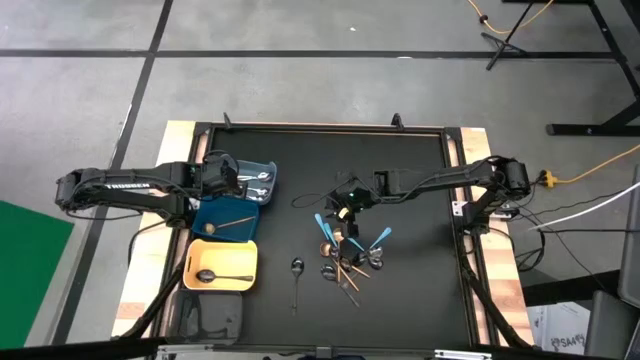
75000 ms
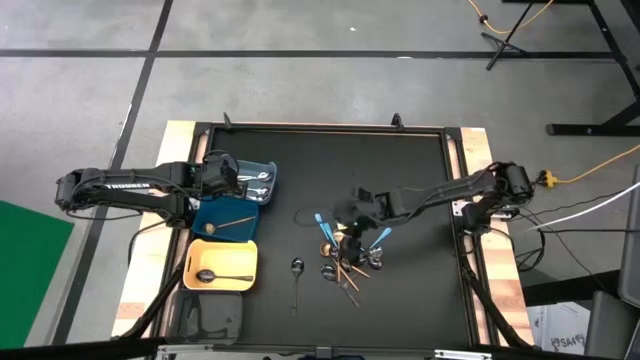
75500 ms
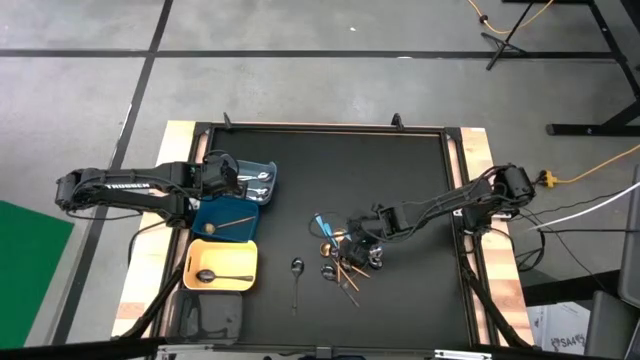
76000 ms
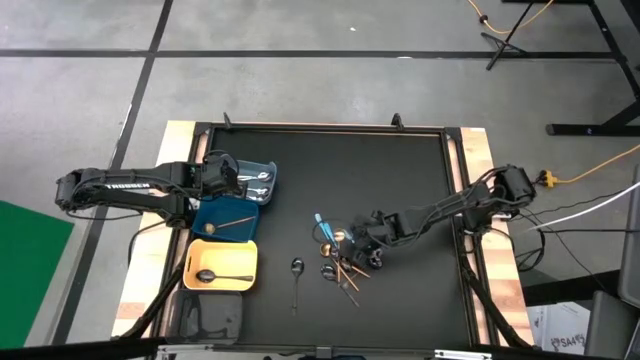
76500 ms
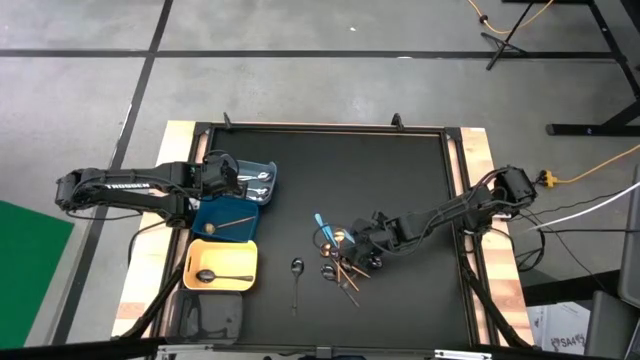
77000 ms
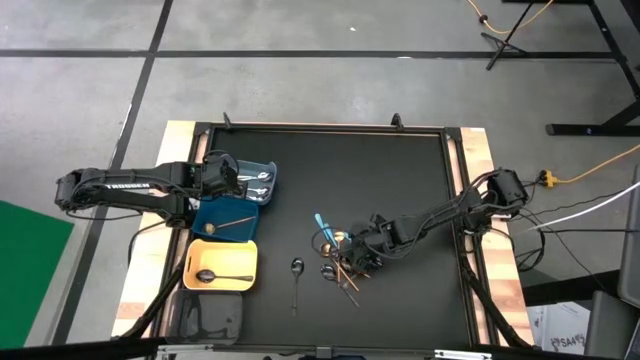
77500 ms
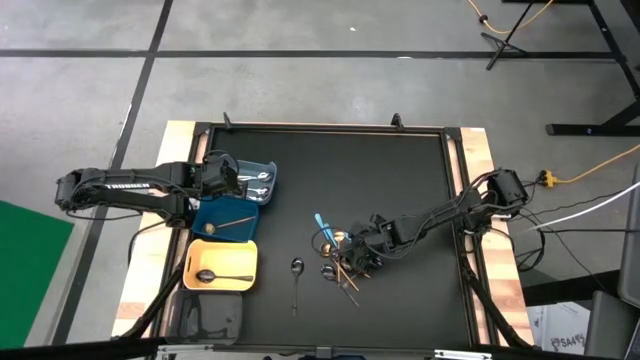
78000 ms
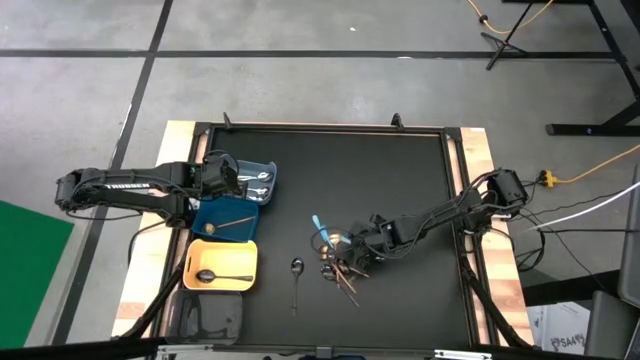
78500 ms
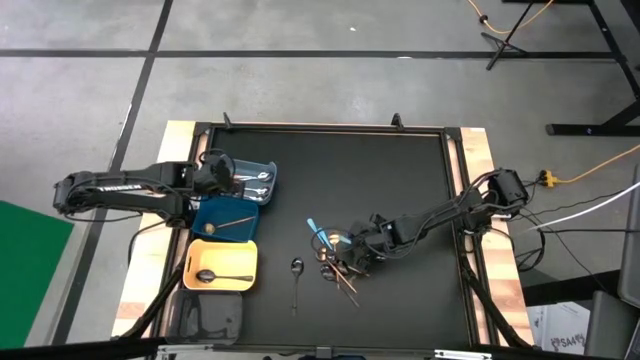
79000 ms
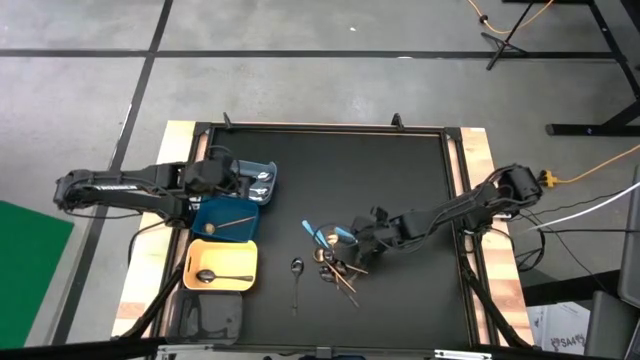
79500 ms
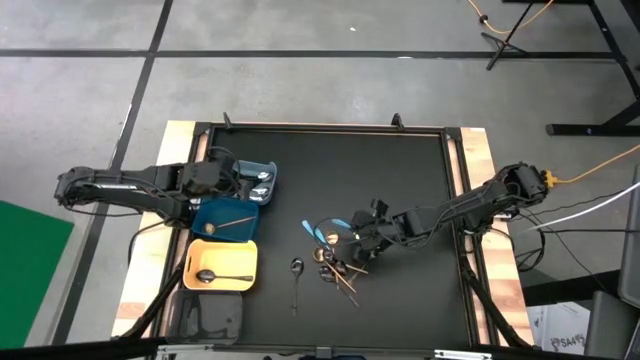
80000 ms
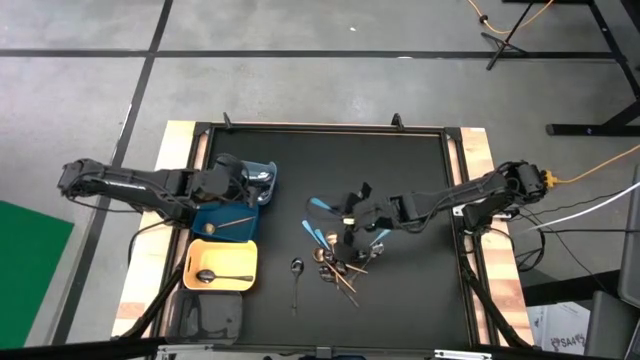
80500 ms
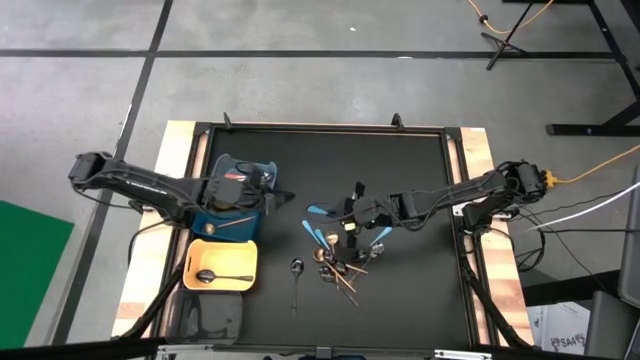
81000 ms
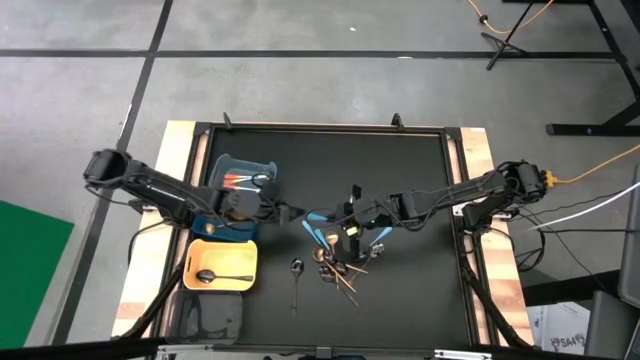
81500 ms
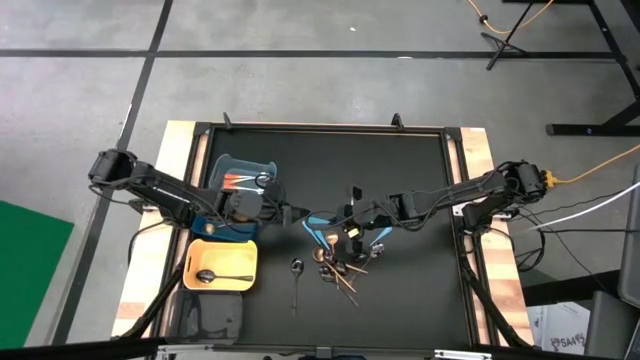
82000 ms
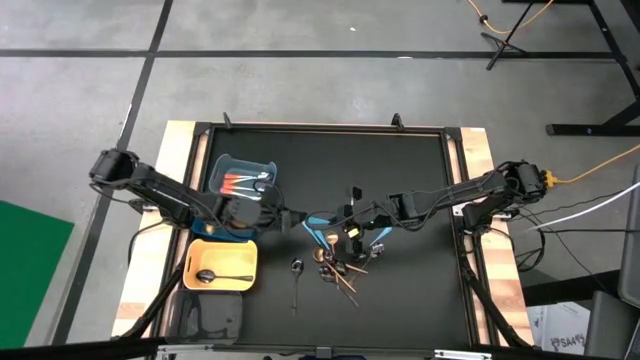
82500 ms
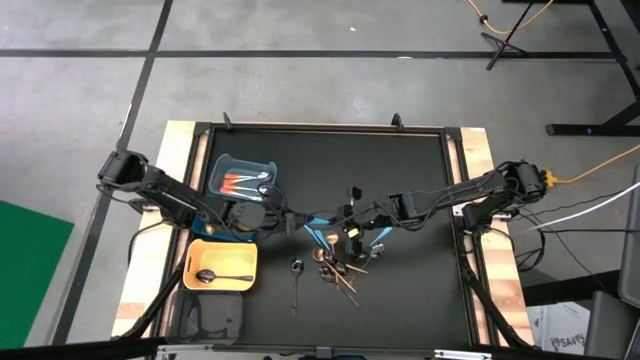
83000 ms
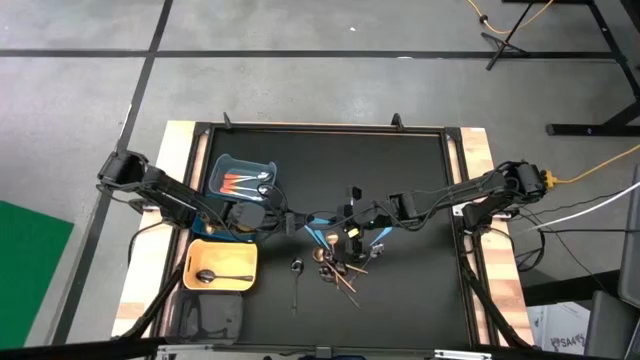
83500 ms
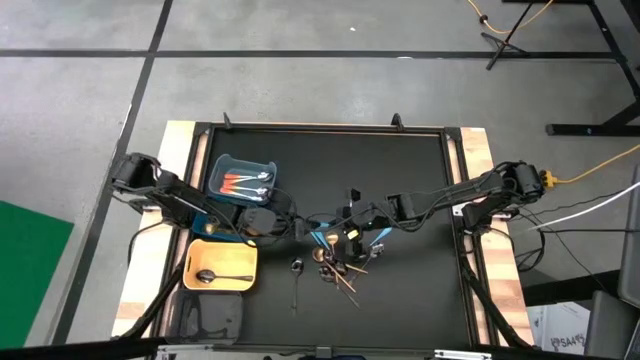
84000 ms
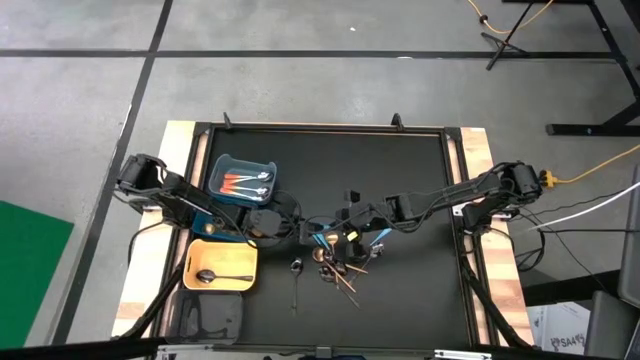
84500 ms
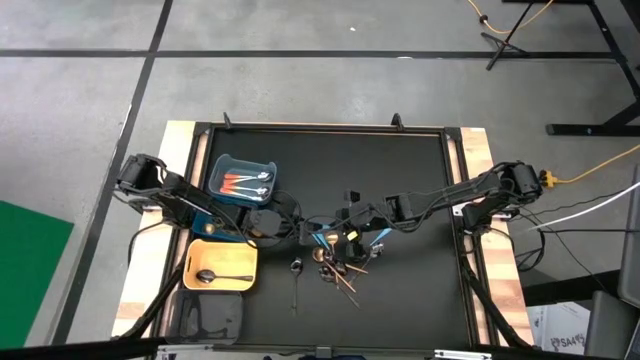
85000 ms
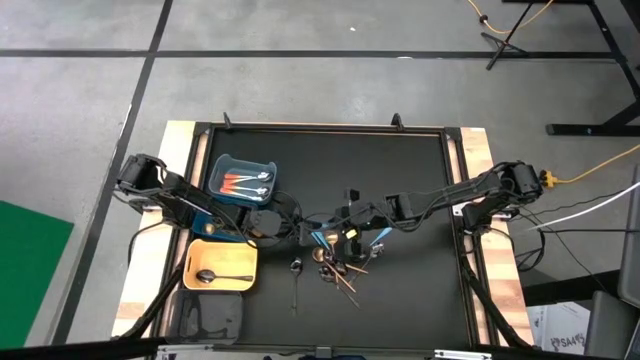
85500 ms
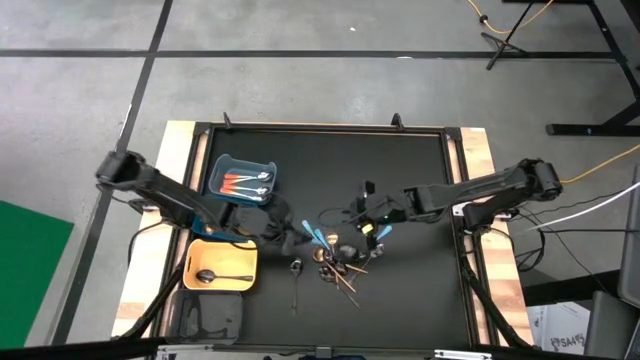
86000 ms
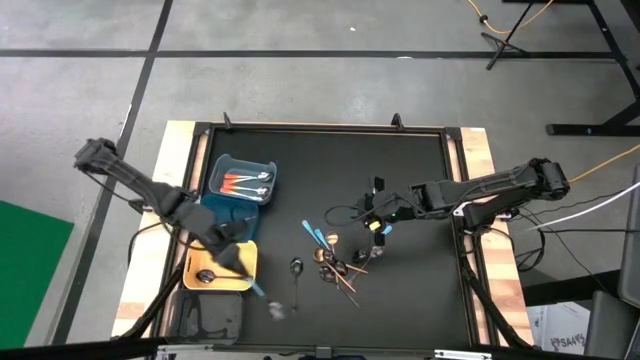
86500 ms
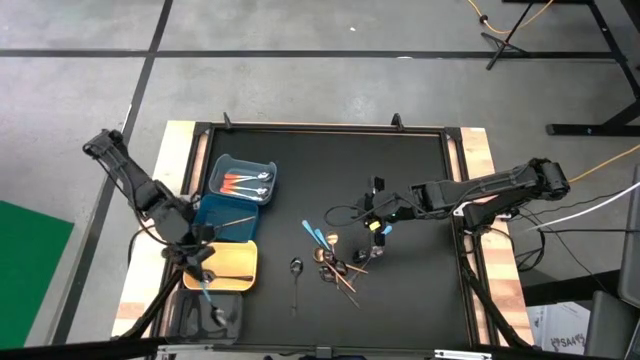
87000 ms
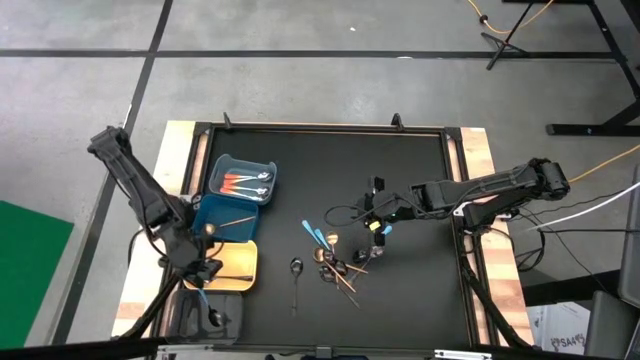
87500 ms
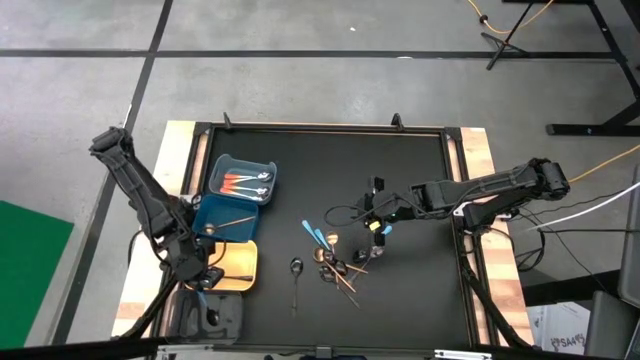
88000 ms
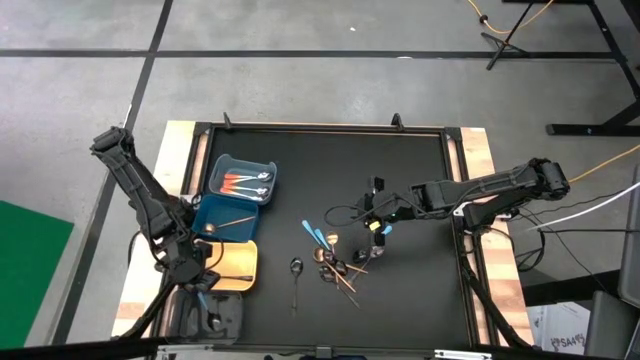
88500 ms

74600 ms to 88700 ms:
Task: Sort silverware by color (type)
Put the blue spoon into the black bin

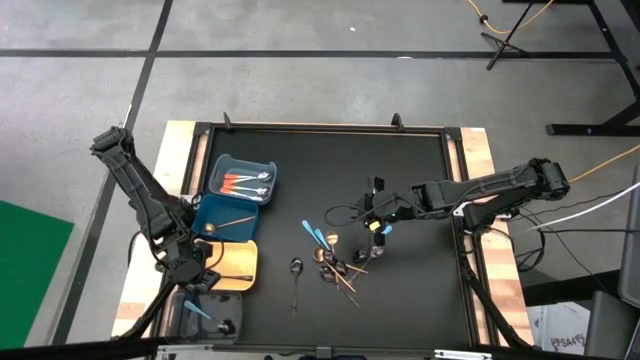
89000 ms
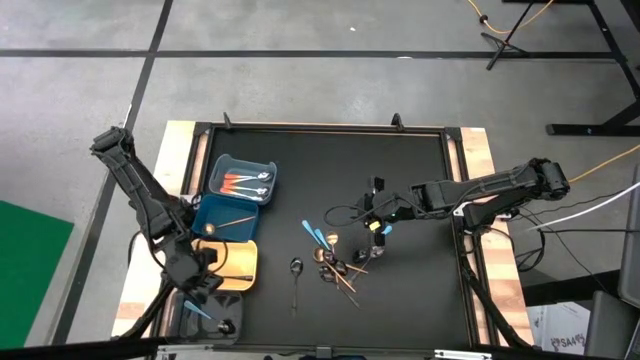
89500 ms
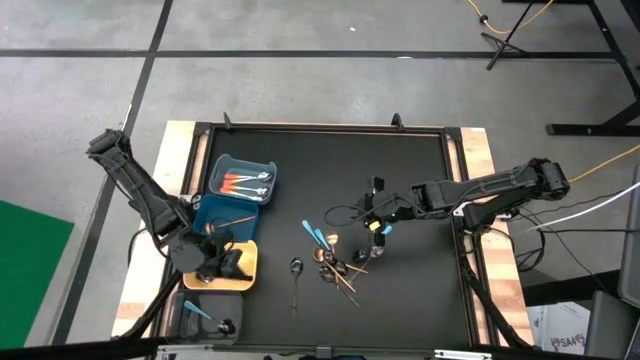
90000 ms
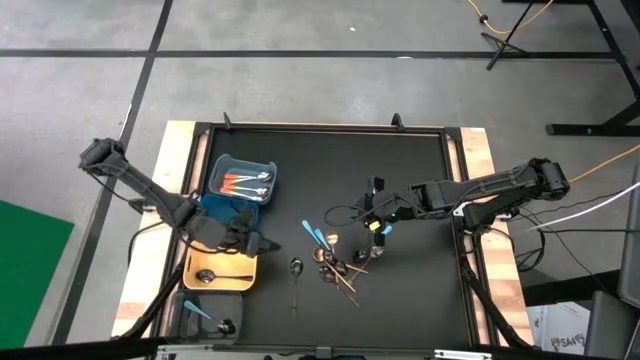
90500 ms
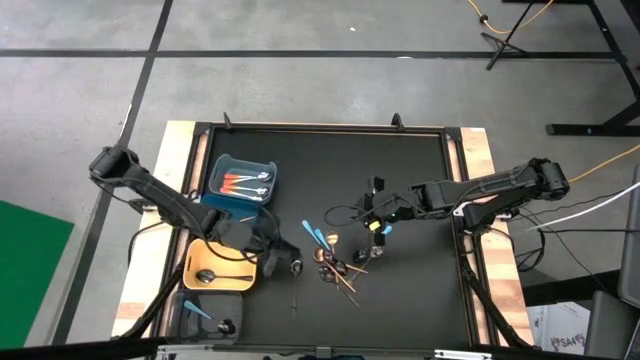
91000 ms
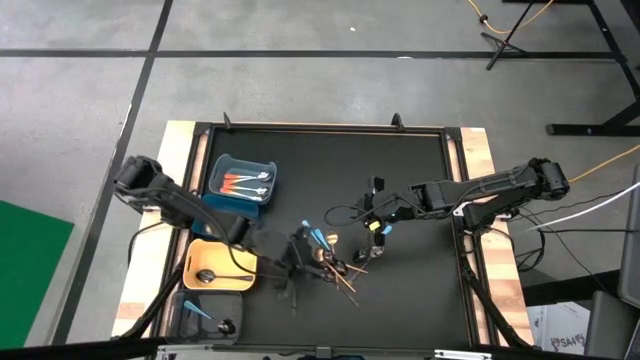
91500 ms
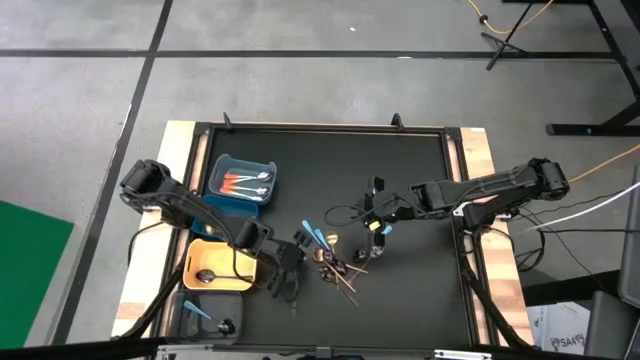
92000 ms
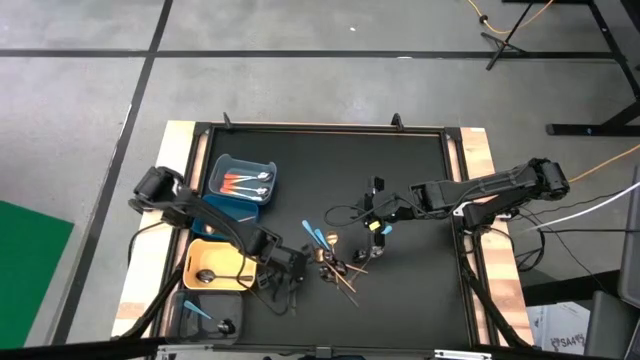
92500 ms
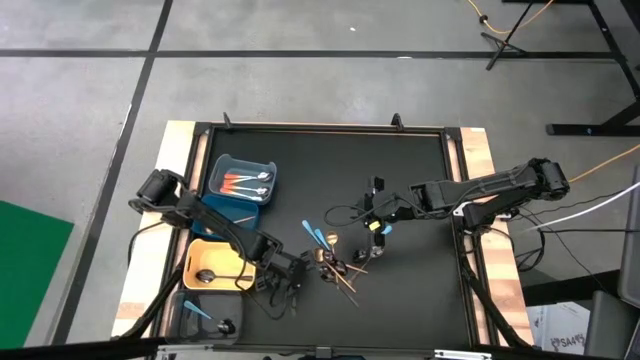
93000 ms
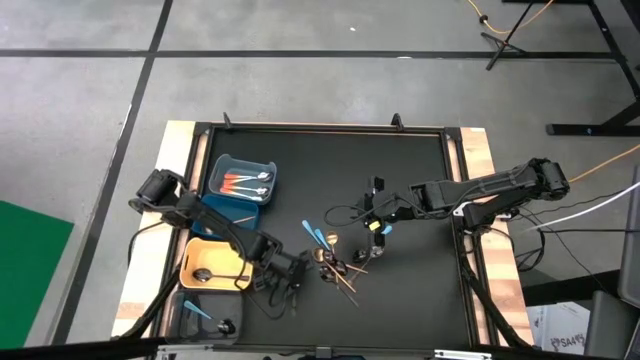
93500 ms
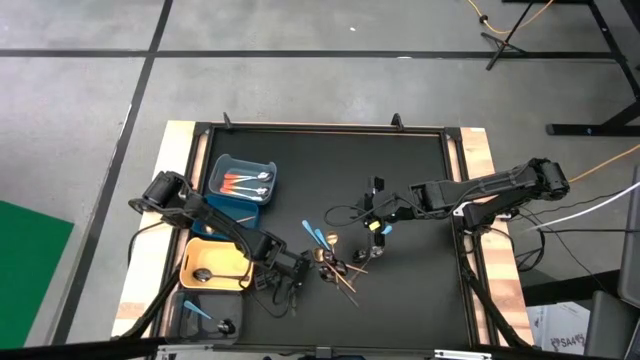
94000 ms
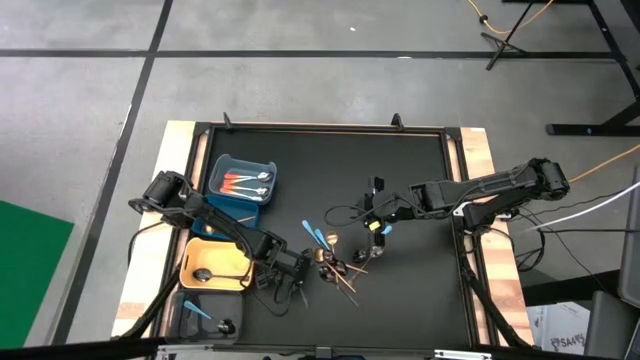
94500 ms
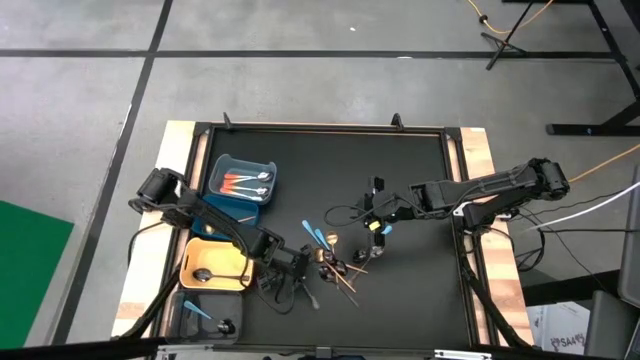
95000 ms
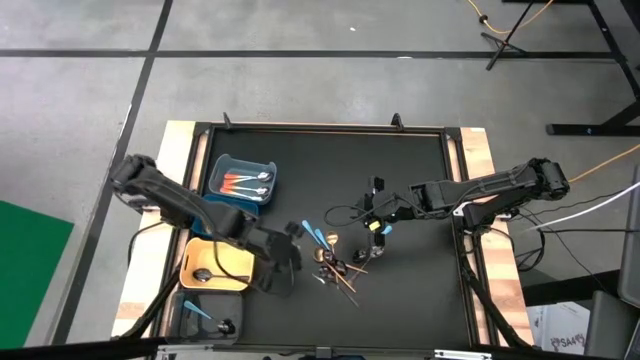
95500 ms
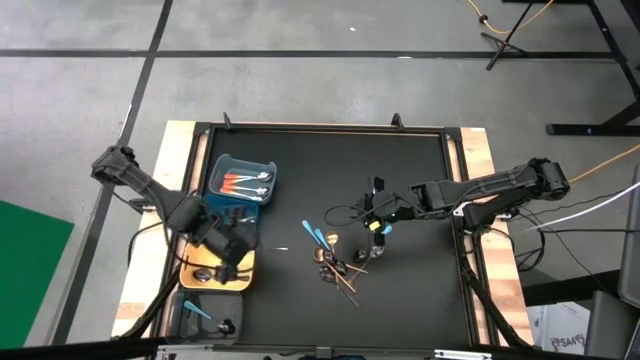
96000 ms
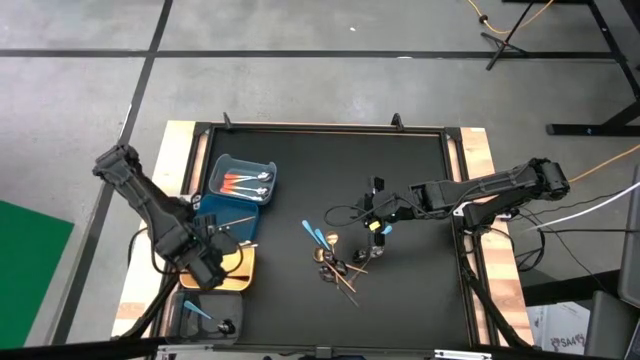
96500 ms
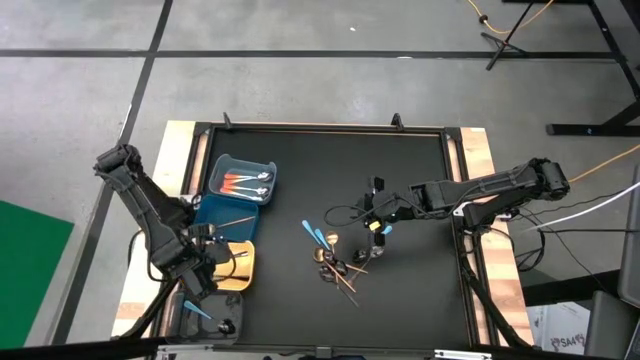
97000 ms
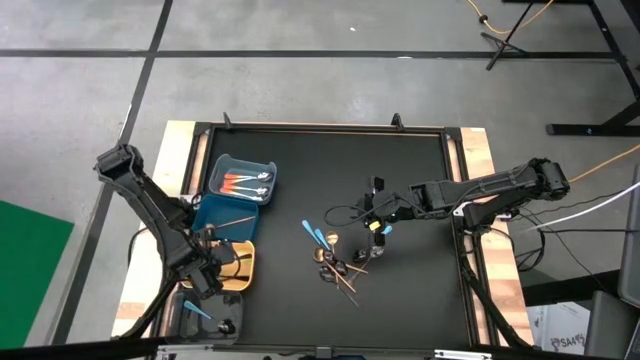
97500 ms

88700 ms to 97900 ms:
Put the black spoon into the orange bin
